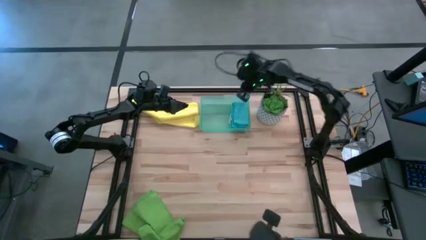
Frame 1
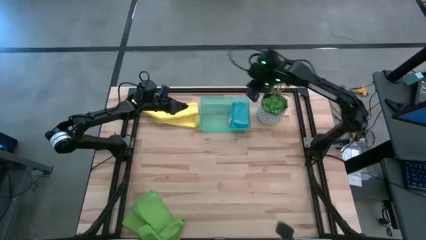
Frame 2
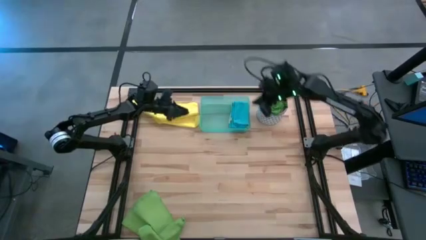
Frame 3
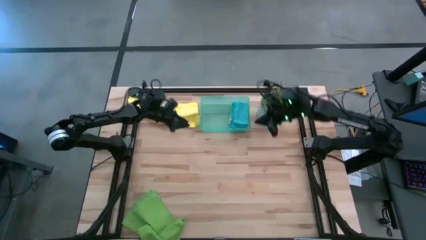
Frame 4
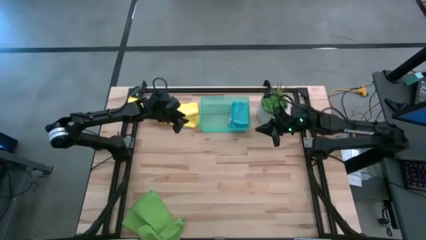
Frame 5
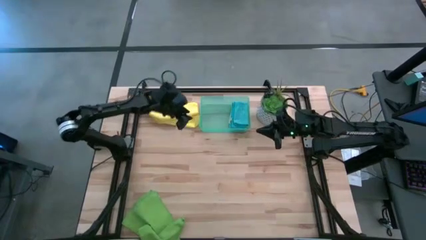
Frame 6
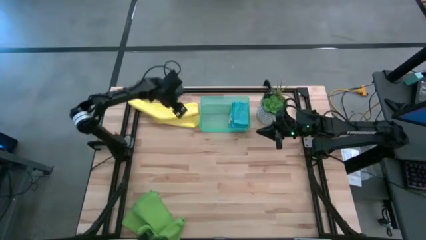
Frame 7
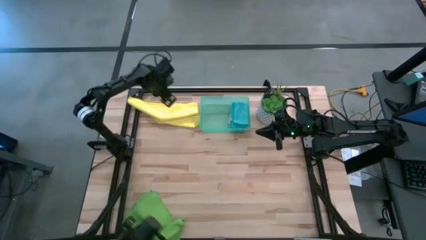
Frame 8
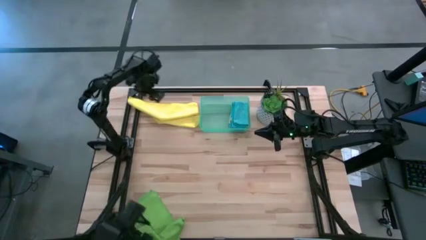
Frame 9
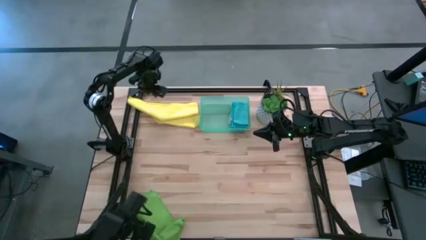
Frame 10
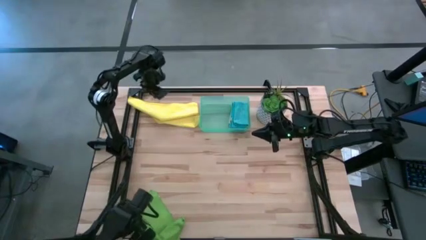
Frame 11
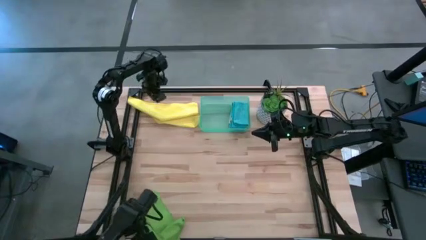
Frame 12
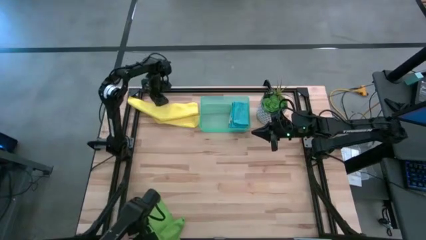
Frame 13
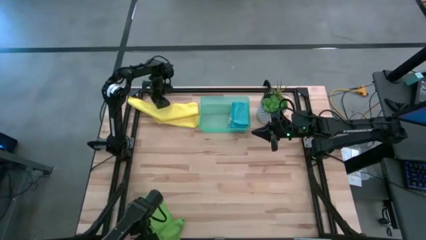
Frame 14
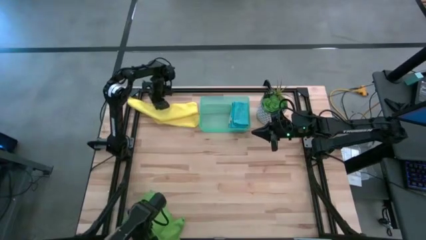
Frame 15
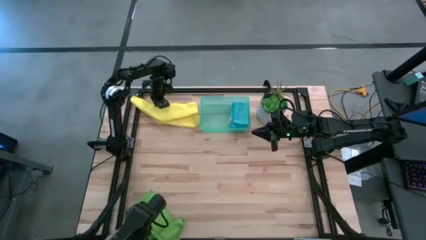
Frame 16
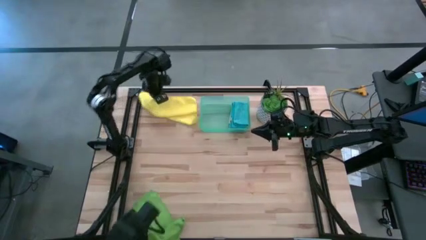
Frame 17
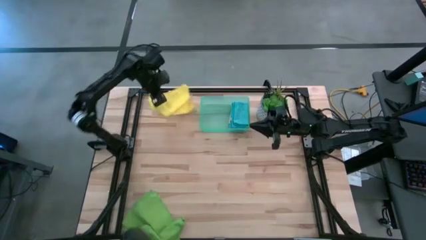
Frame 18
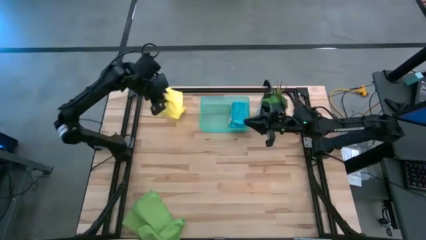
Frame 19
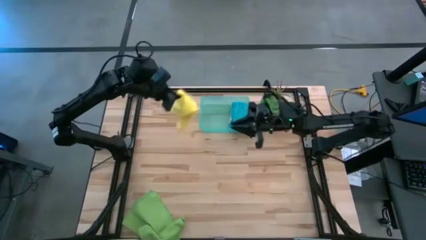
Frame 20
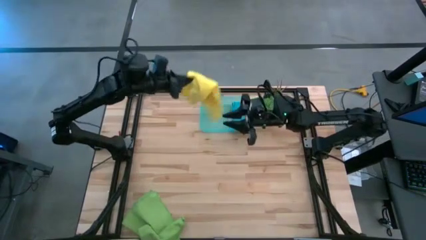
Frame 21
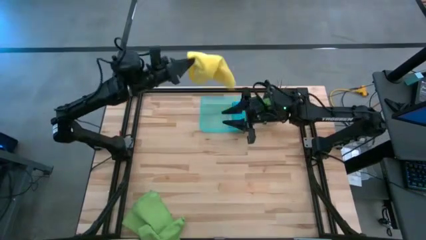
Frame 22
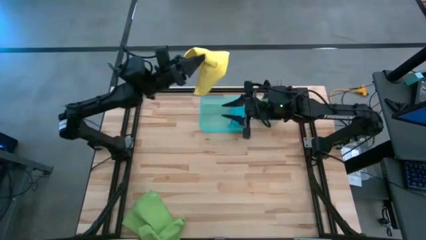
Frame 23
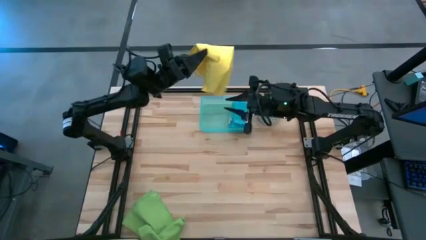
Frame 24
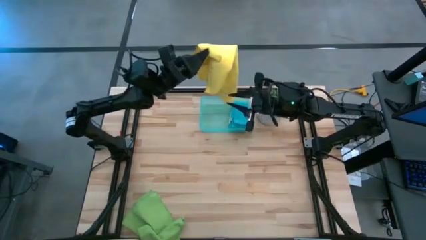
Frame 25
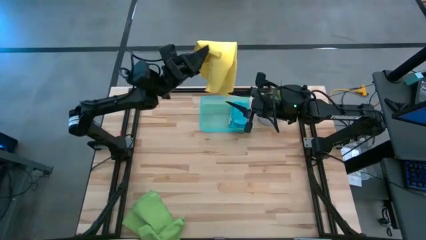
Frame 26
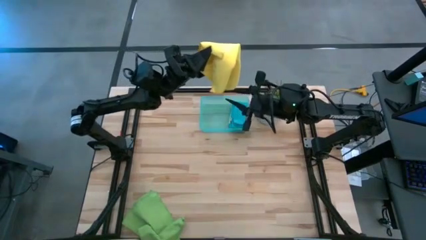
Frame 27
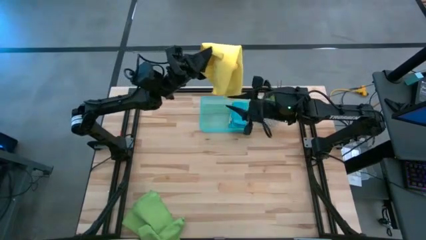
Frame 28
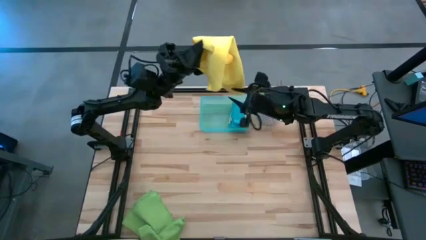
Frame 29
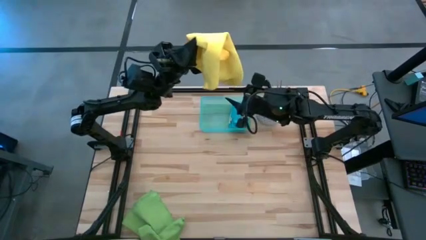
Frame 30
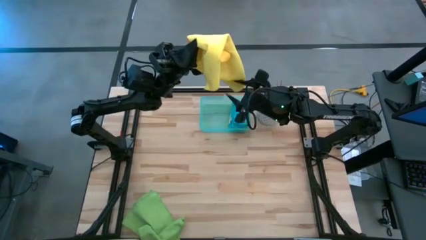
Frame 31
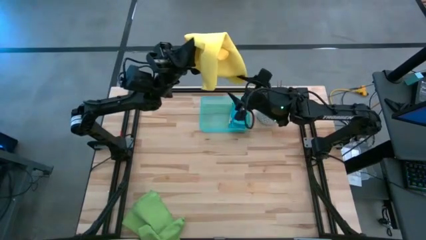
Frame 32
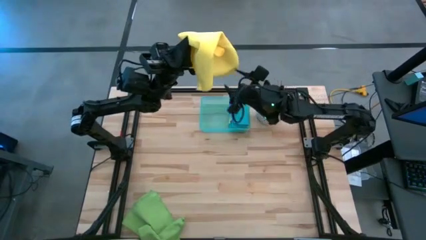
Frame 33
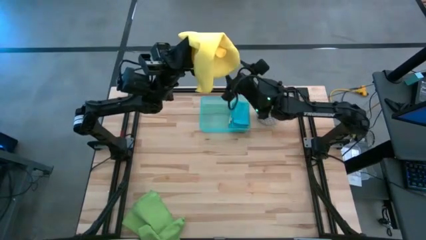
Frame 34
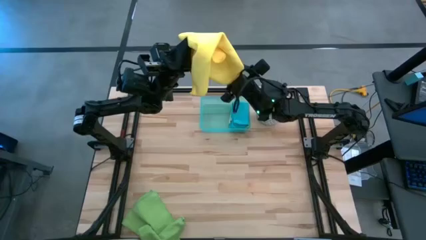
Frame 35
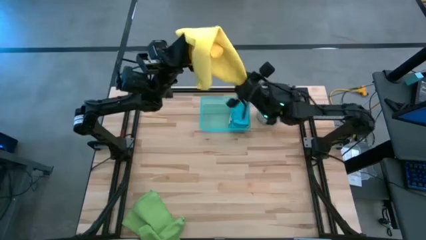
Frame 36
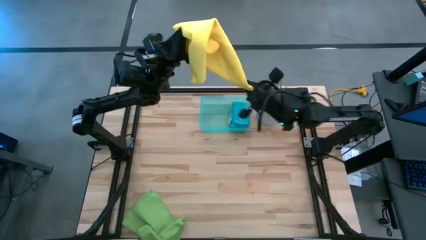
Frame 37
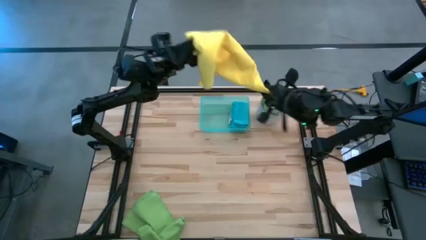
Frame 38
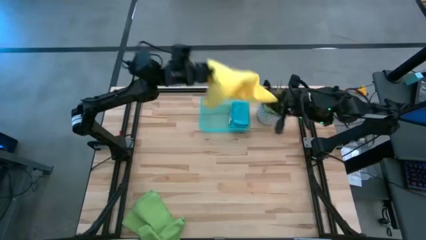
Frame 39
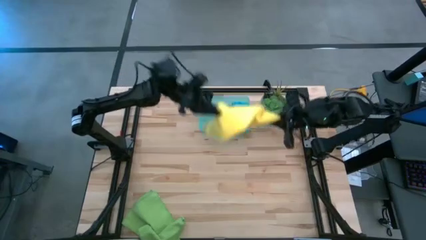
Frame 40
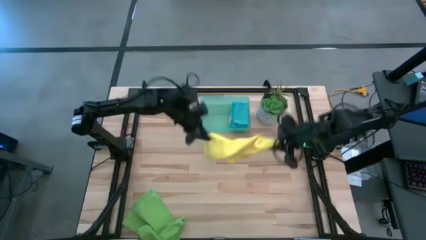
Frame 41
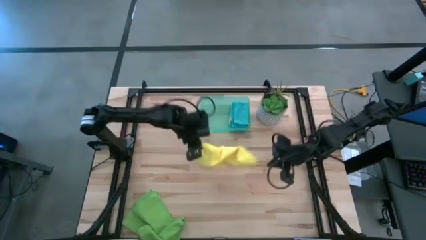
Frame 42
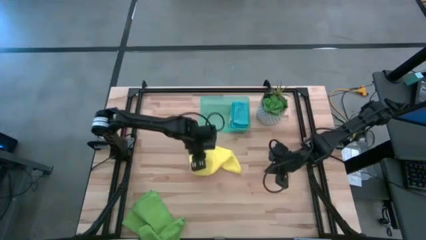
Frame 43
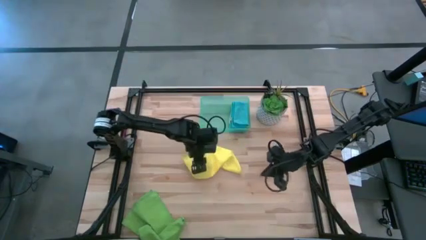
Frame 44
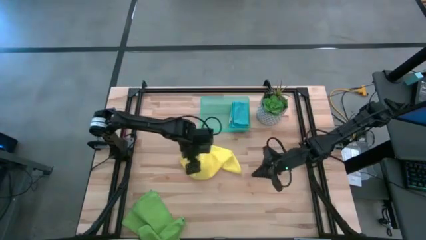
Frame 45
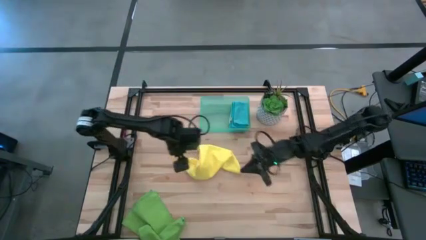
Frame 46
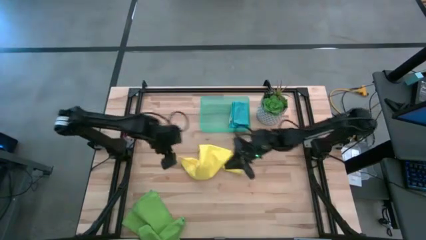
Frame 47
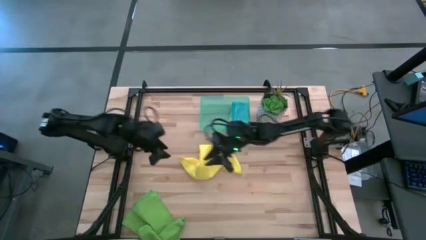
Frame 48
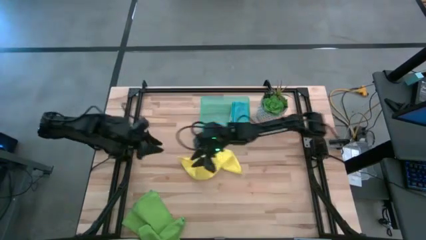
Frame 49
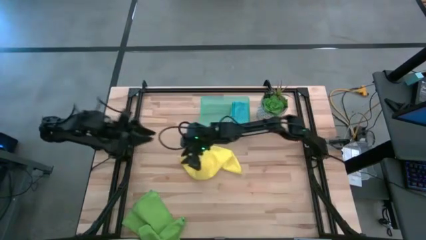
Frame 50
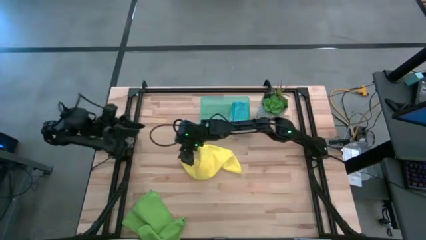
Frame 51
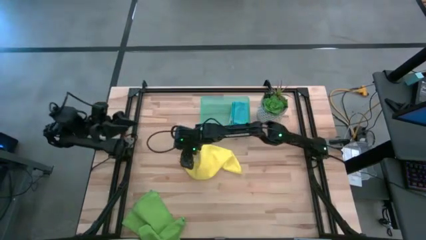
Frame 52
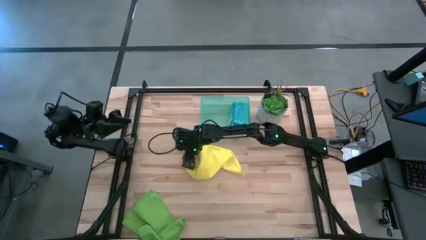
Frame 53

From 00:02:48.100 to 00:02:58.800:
Task: Fold microfiber towels
Fold the yellow microfiber cloth

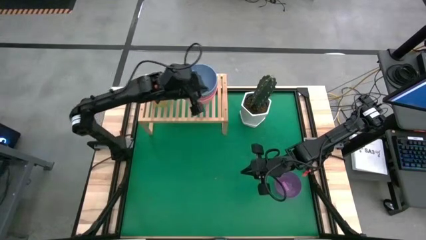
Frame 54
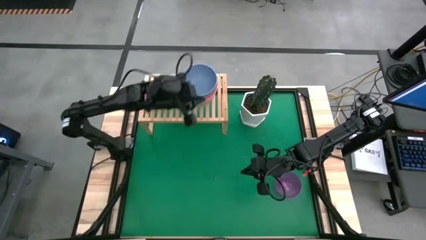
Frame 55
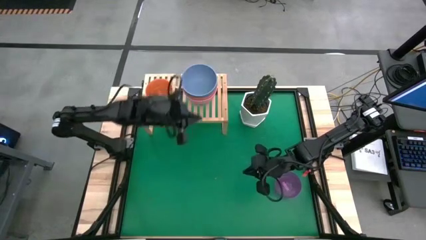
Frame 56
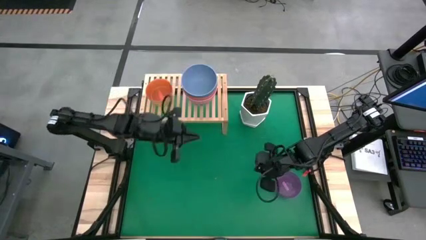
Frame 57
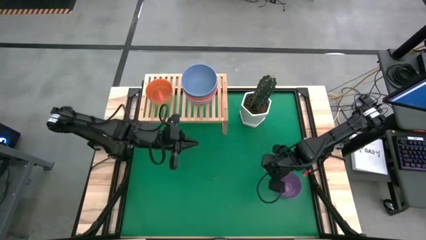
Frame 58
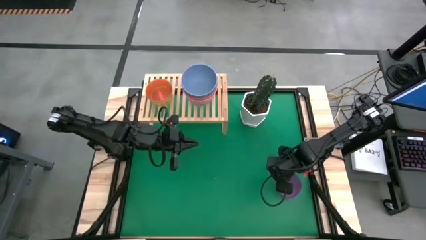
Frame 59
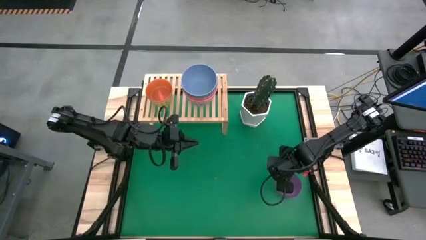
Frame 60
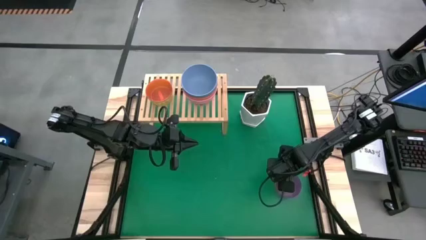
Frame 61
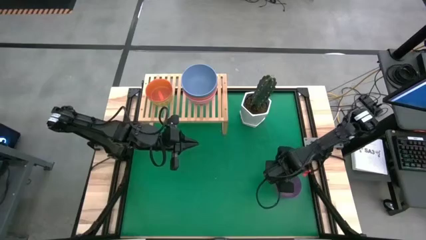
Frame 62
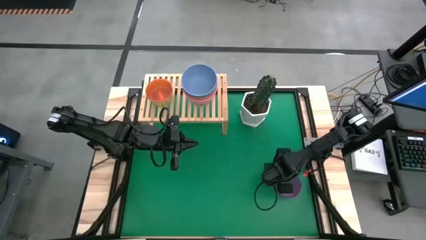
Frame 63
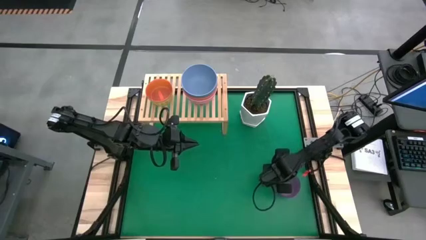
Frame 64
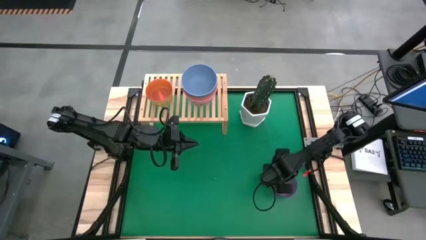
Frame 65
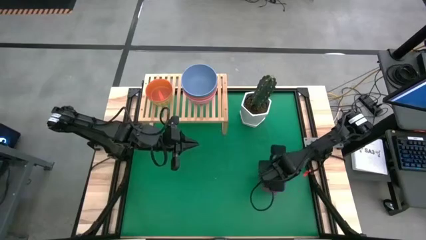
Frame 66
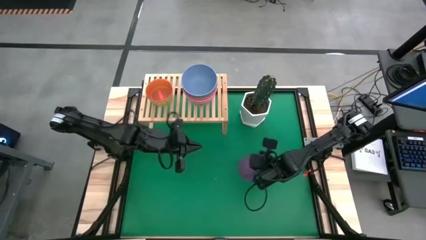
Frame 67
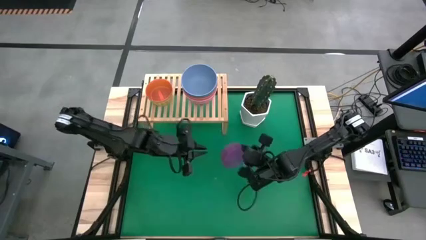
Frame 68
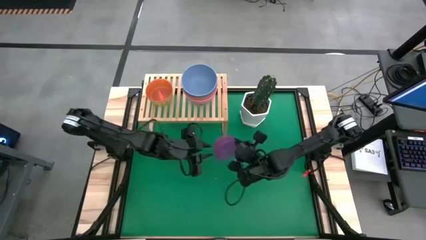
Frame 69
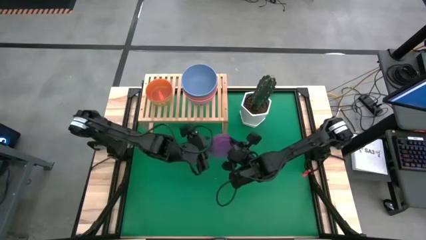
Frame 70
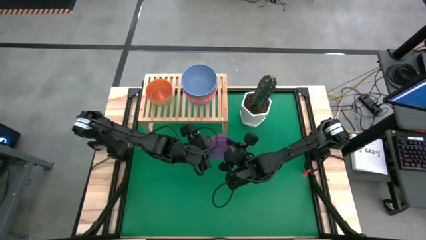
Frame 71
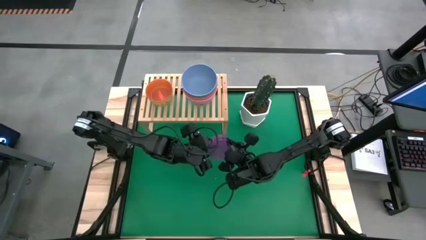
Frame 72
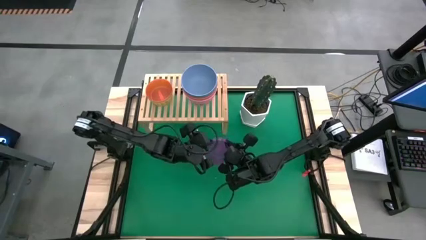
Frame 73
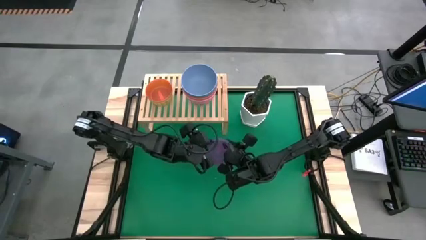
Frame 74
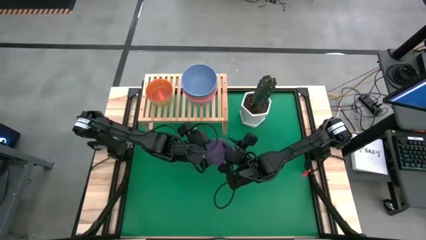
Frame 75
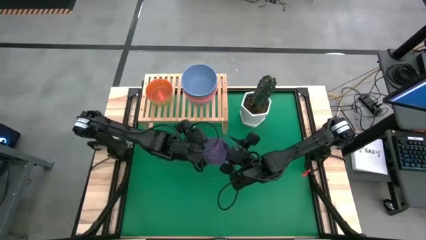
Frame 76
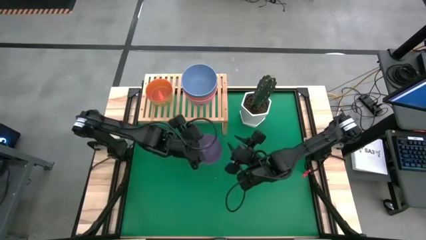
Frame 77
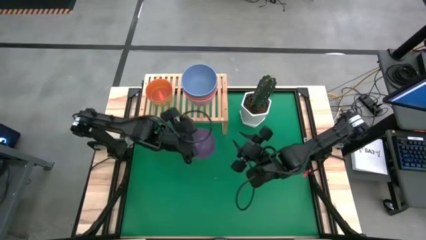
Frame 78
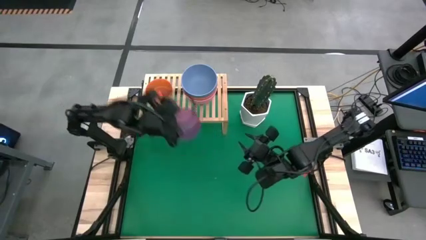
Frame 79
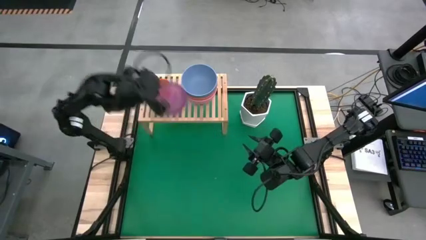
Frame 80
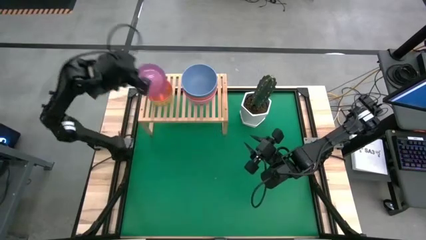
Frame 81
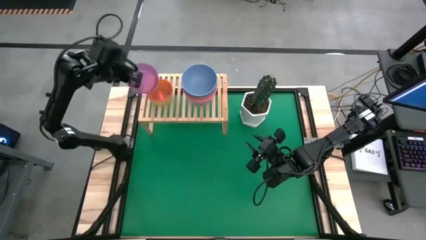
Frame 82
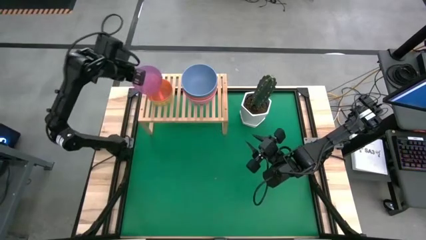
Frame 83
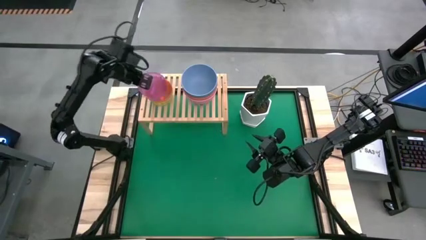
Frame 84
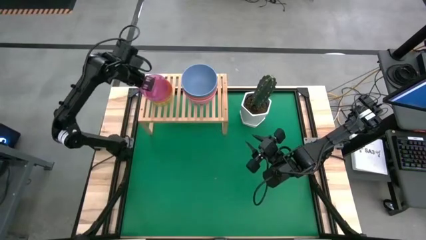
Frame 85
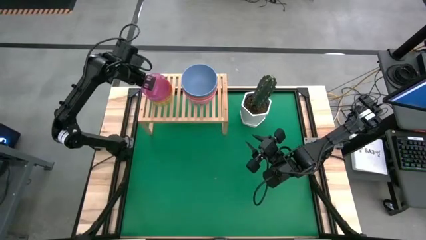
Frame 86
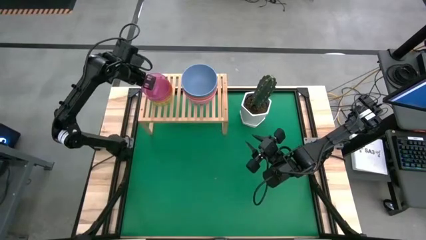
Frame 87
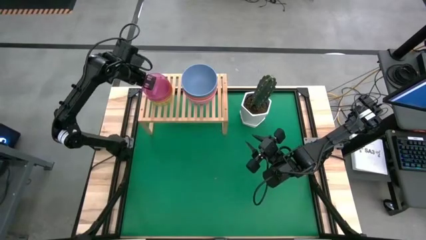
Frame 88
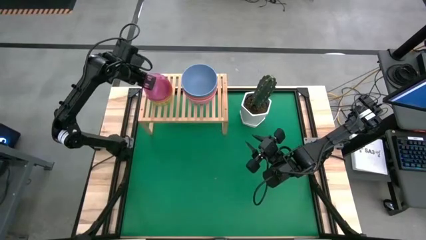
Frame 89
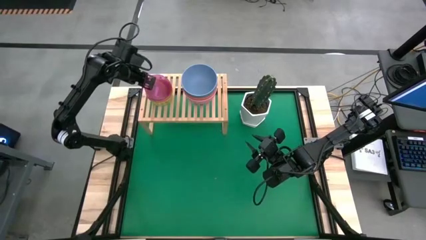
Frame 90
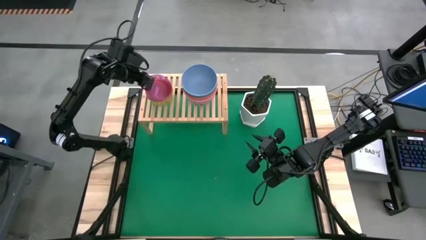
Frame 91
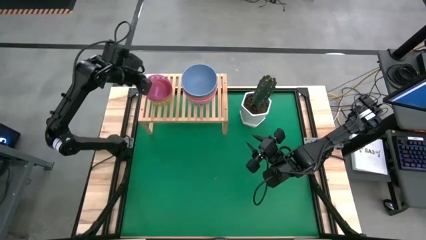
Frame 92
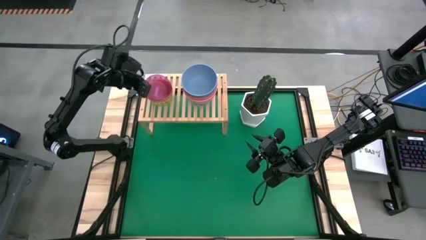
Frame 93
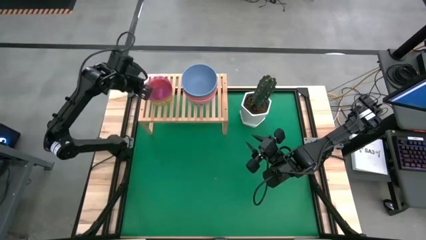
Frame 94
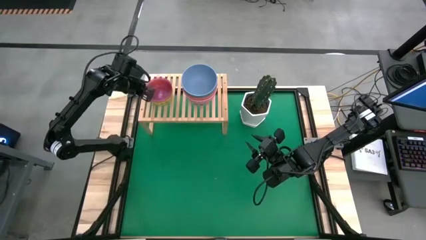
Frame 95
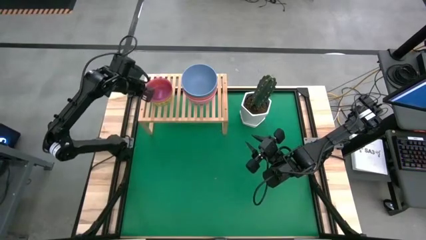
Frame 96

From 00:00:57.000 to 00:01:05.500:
Task: Place and stack bowls onto a shelf
Stack the purple bowl on top of the light orange bowl on the shelf
